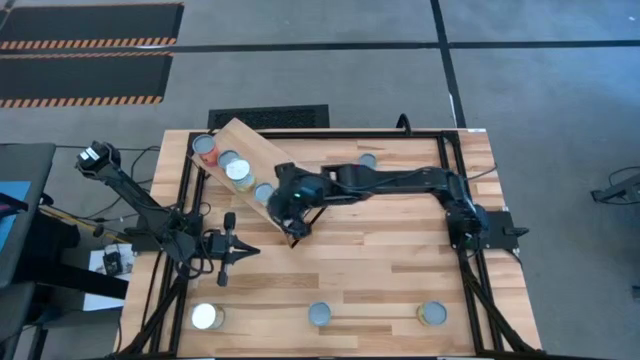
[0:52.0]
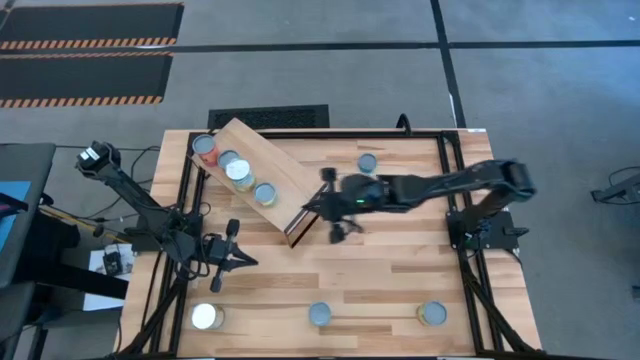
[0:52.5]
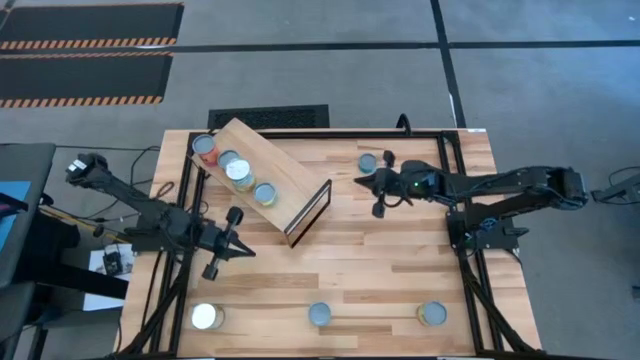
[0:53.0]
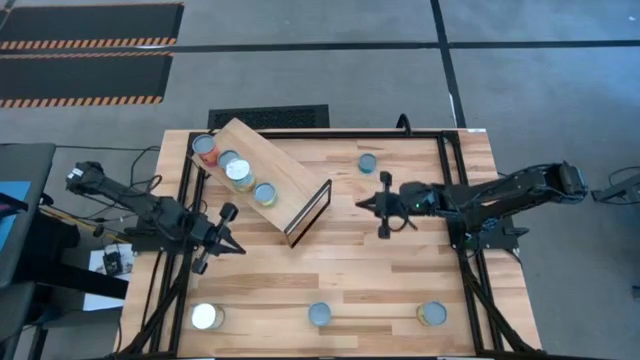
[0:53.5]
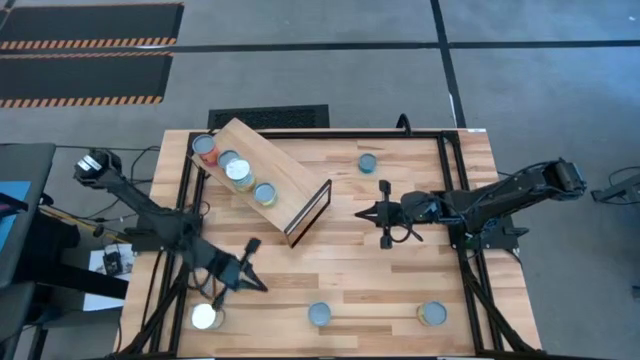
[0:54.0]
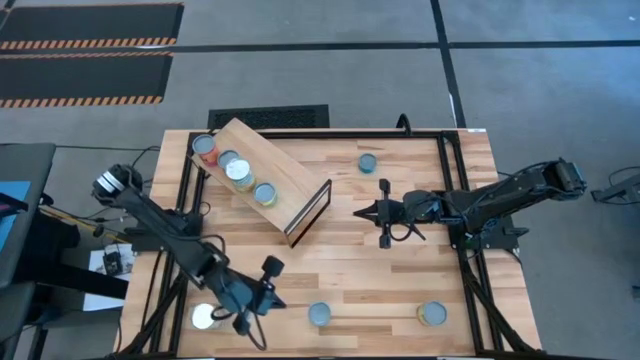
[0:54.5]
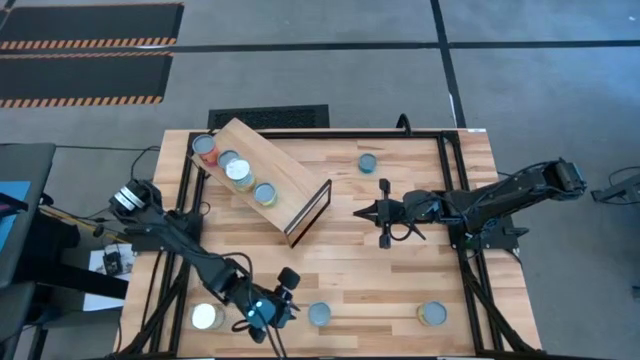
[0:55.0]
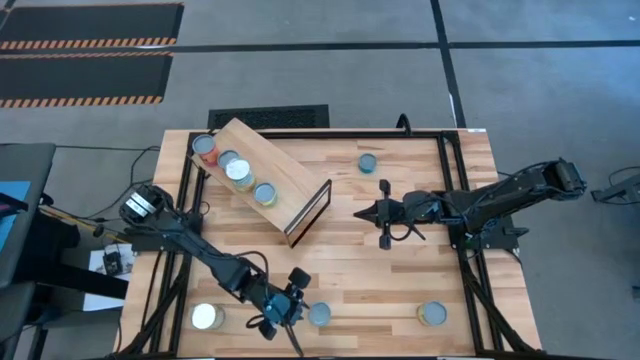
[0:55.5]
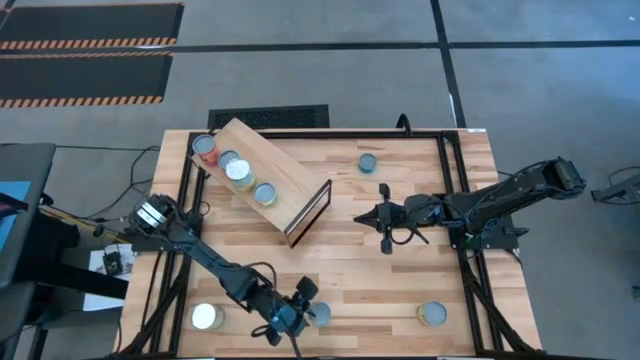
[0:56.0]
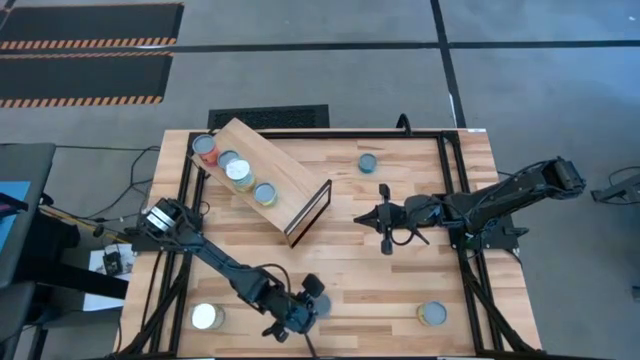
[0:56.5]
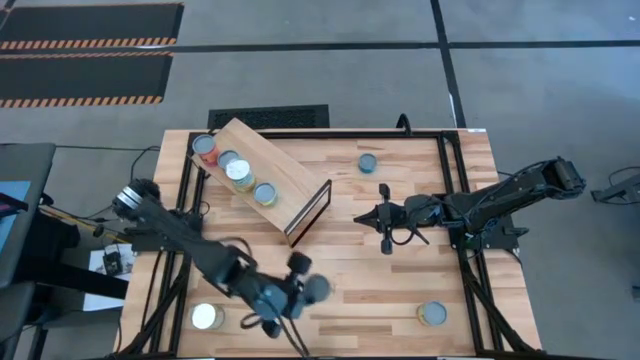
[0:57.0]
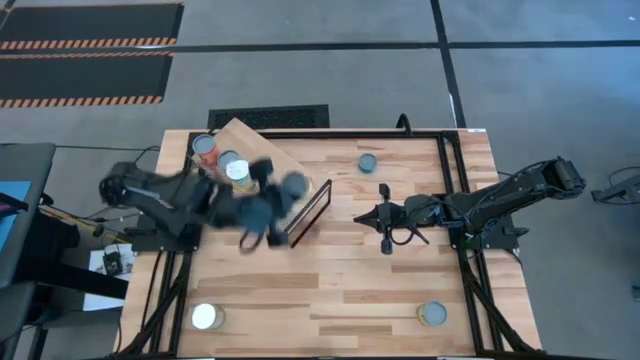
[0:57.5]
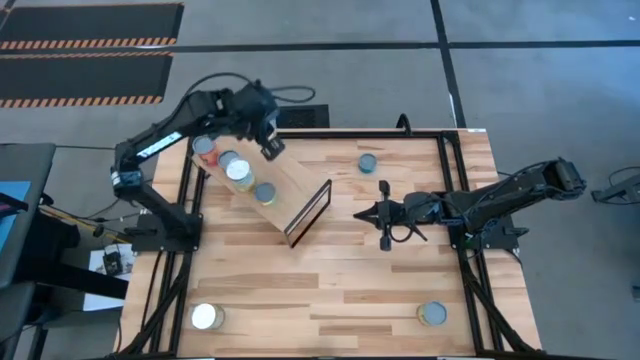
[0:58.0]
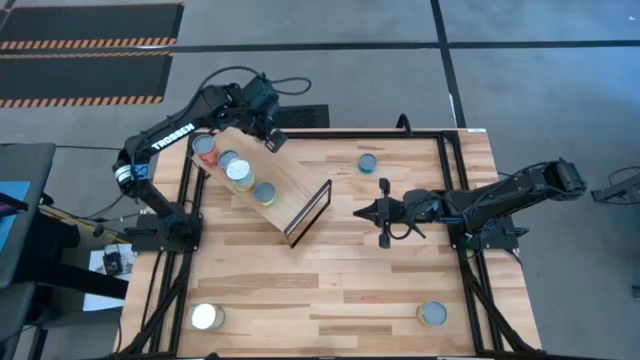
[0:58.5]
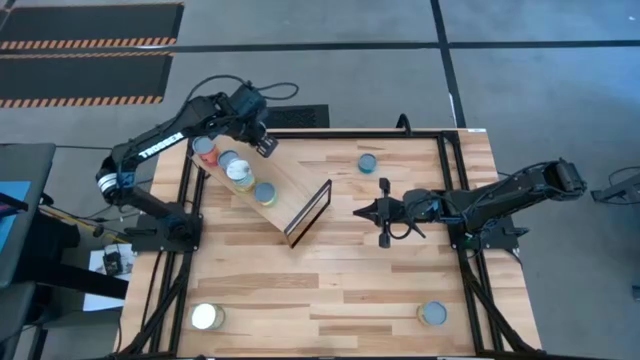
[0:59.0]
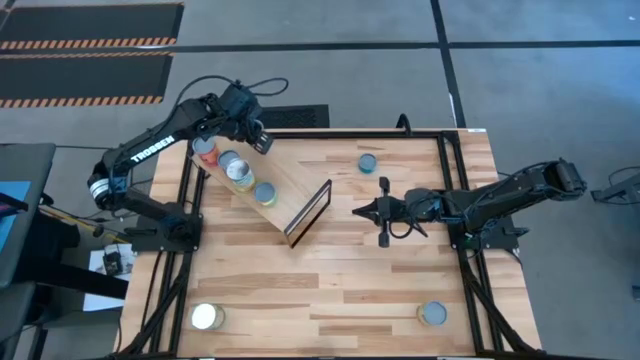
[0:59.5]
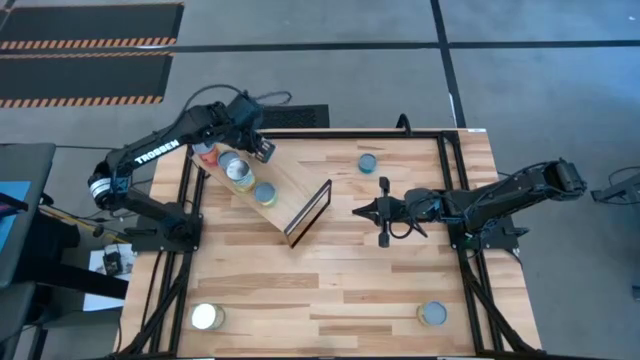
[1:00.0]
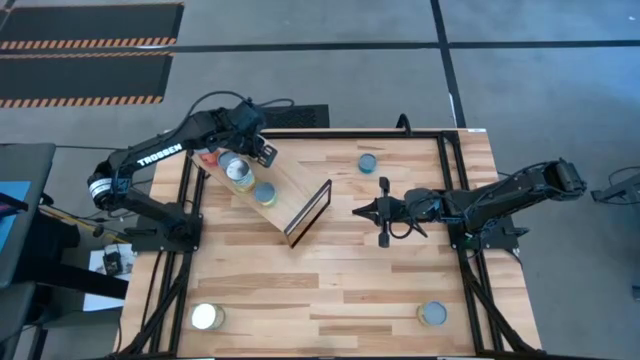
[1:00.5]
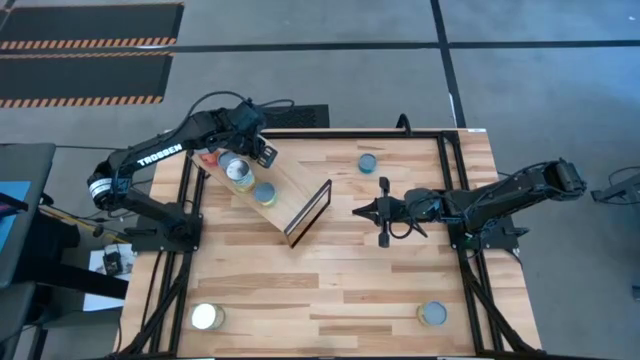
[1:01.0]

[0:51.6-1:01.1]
Task: Pick and place cans onto a shelf
Put the canned peaches on the shelf

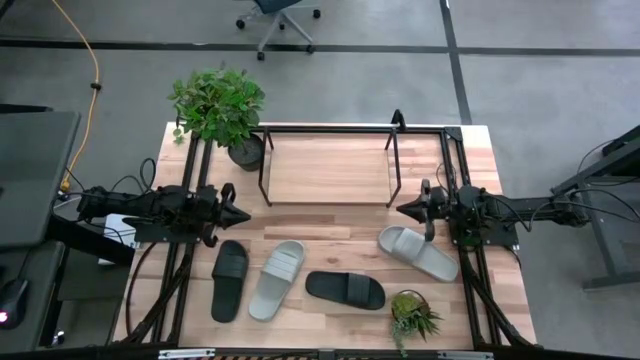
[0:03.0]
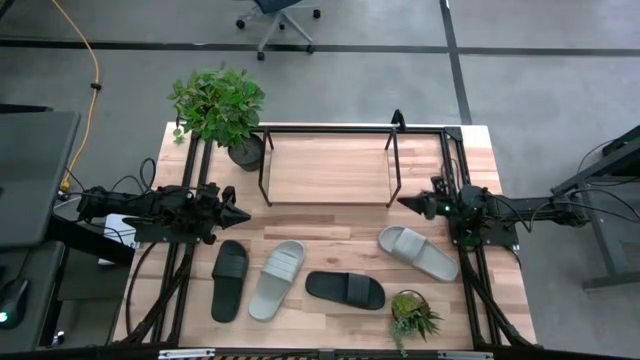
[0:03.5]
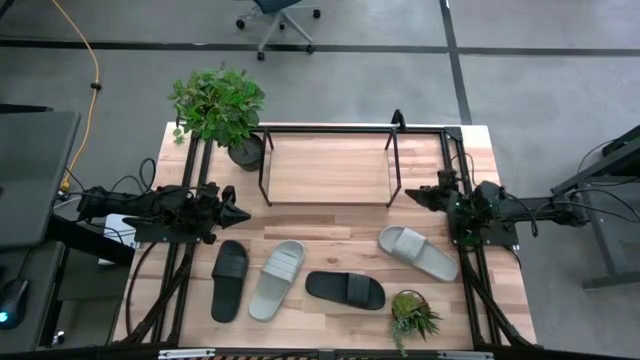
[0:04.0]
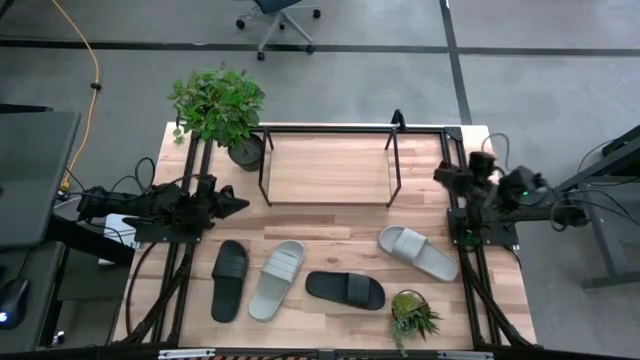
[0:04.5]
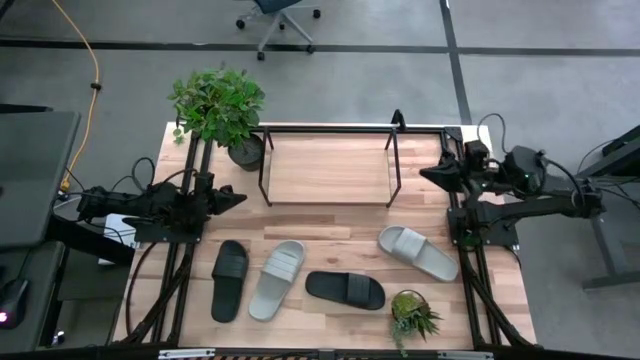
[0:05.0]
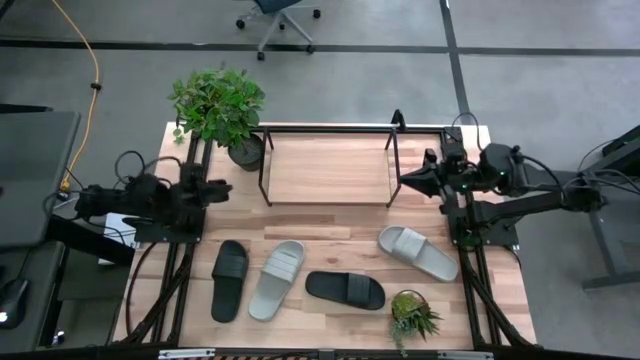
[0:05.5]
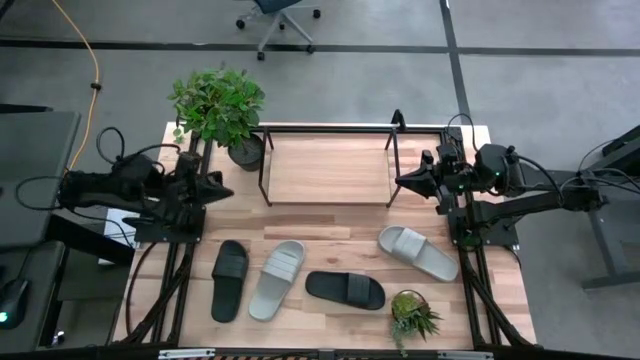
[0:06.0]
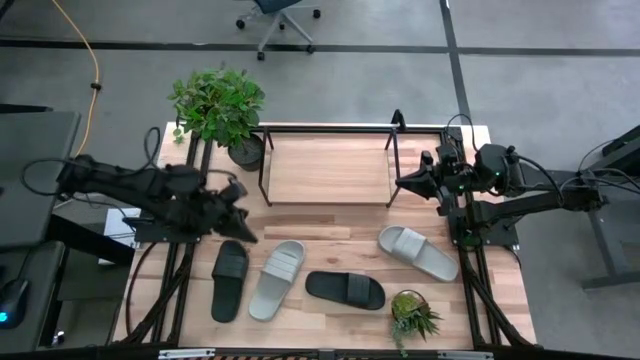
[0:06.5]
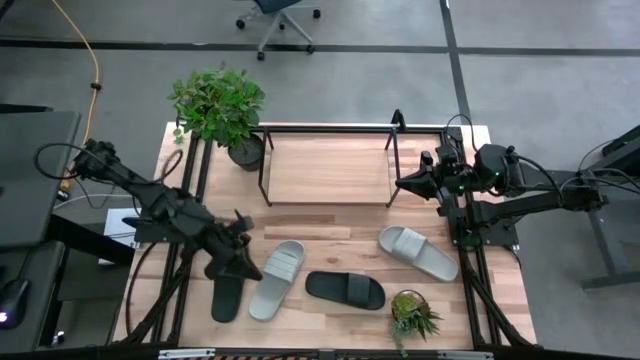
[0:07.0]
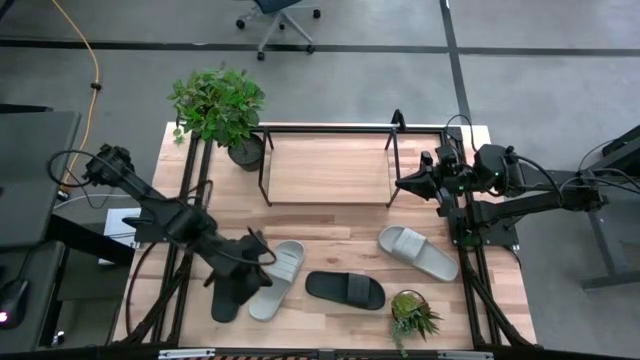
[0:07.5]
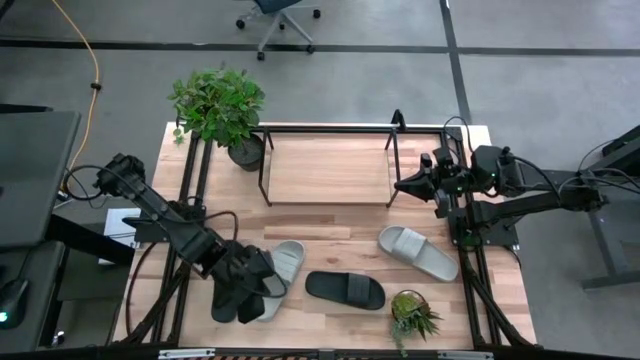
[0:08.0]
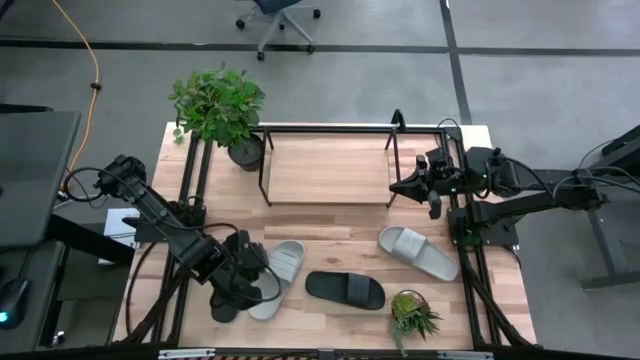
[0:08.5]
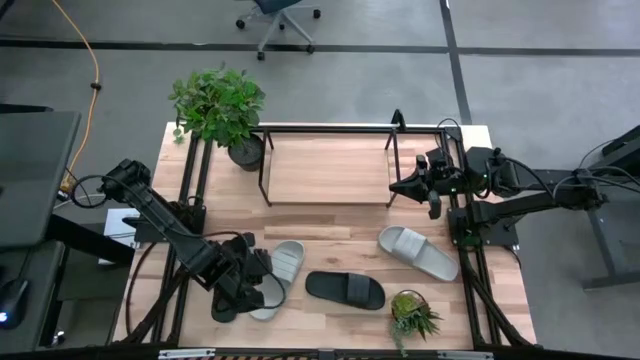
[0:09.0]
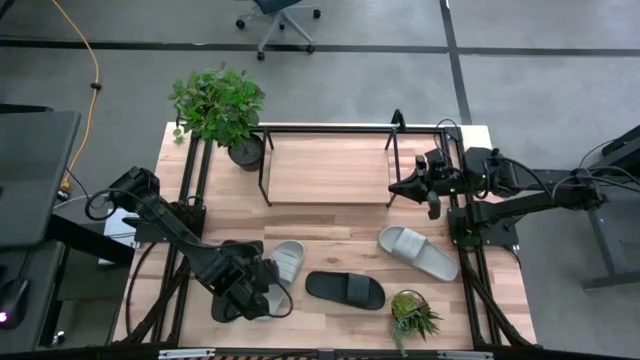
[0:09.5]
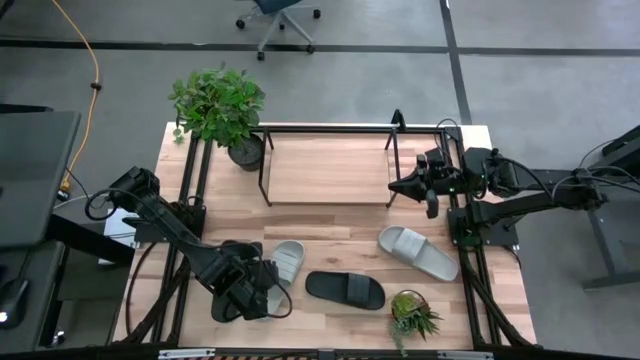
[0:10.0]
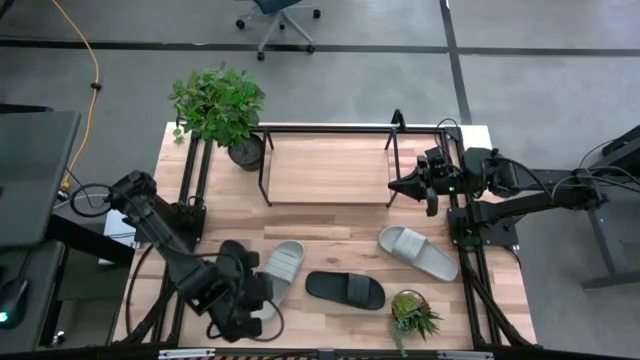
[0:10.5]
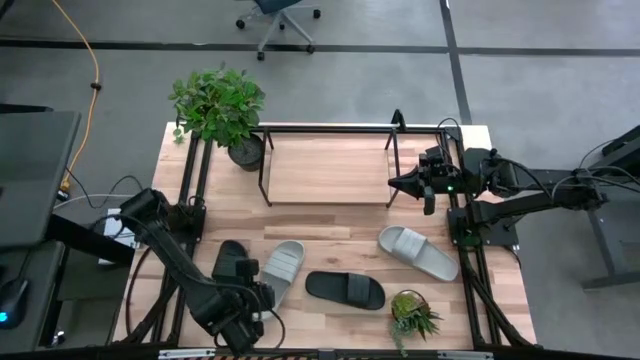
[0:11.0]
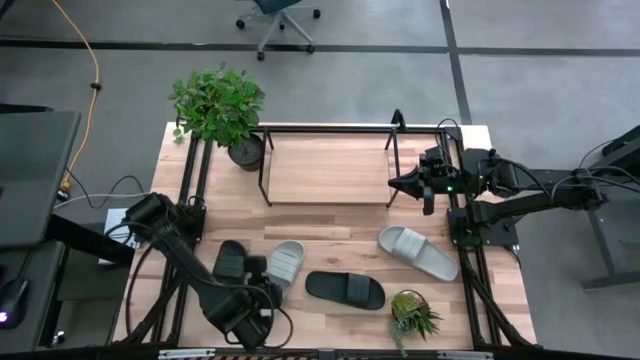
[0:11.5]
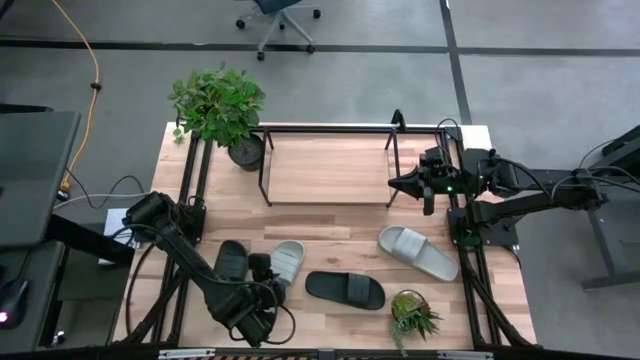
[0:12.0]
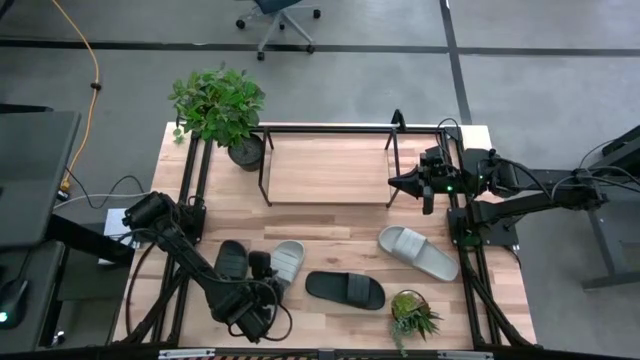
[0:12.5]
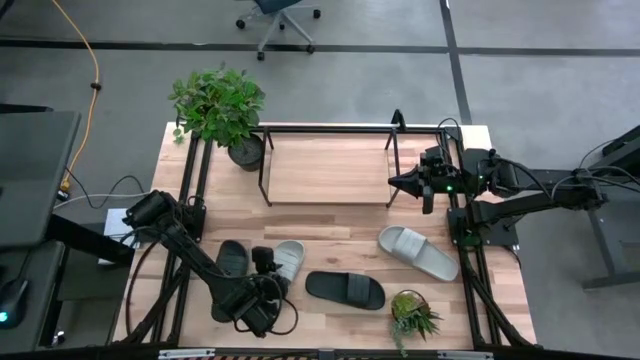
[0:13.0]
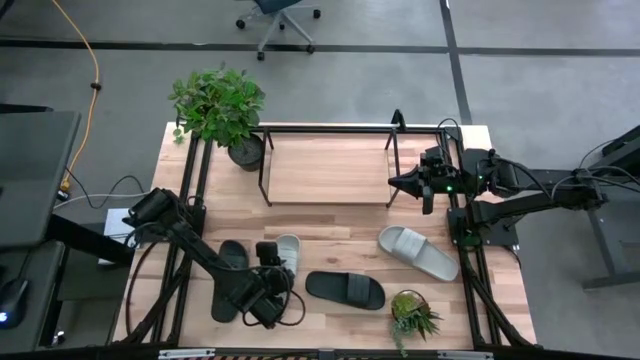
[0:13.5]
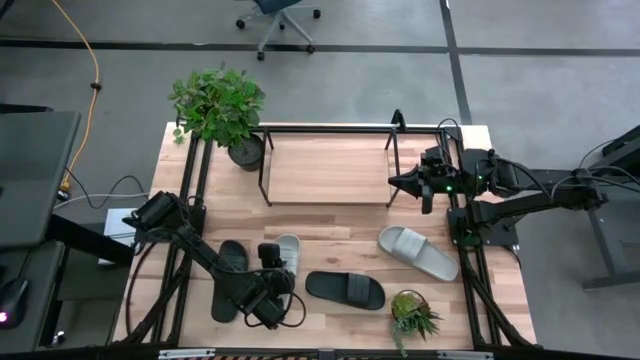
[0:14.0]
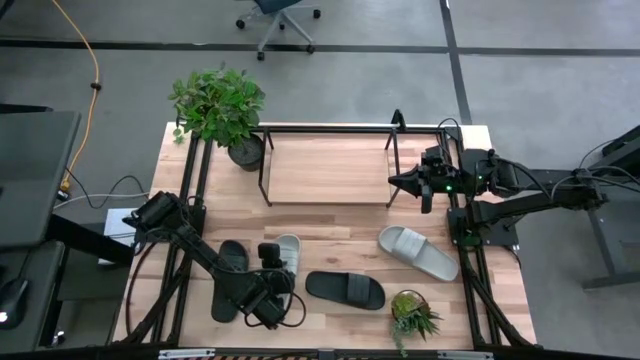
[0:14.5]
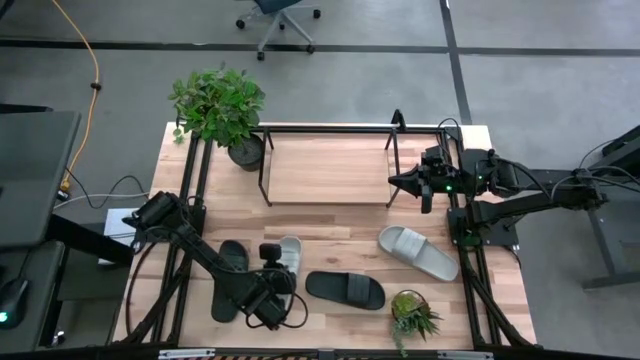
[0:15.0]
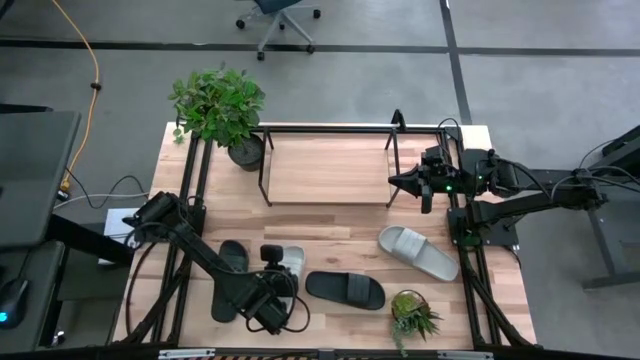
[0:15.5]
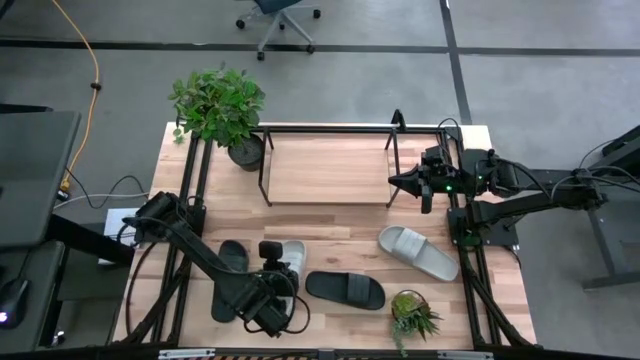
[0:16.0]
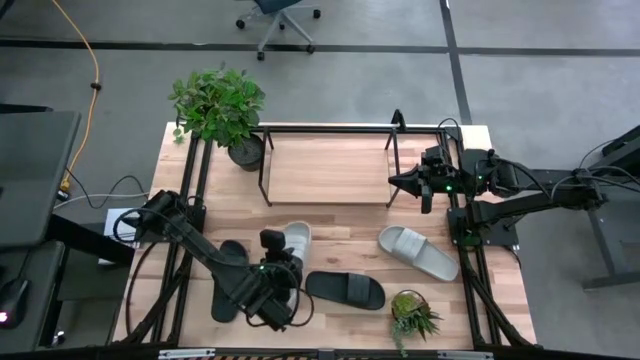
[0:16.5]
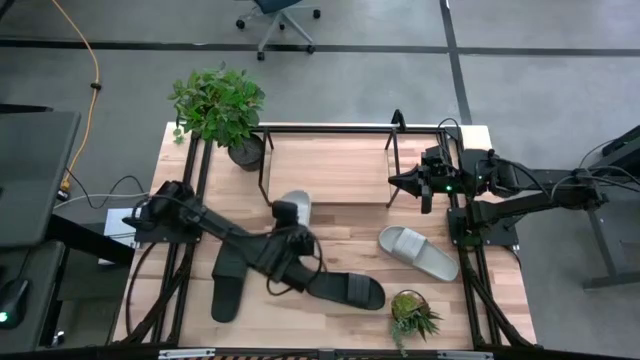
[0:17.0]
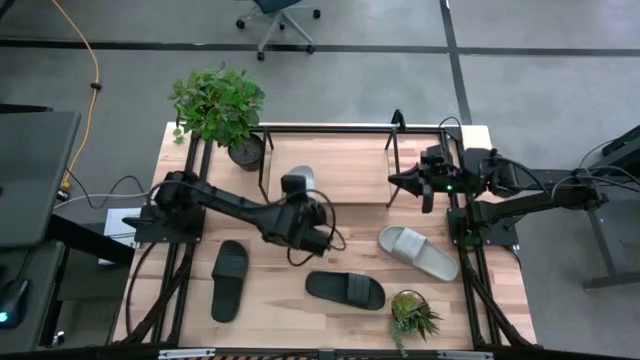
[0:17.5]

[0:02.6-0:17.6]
Task: Pick and place slides into the shelf
Put the left gray slipper on the shelf
